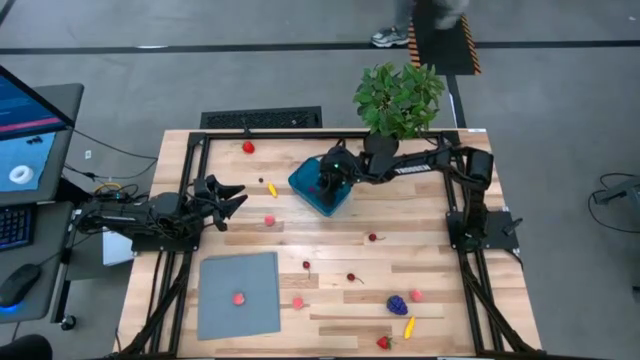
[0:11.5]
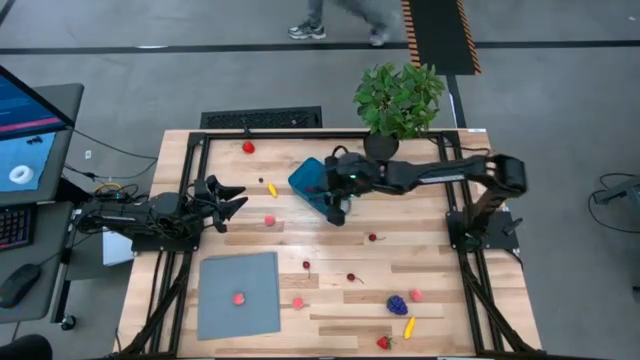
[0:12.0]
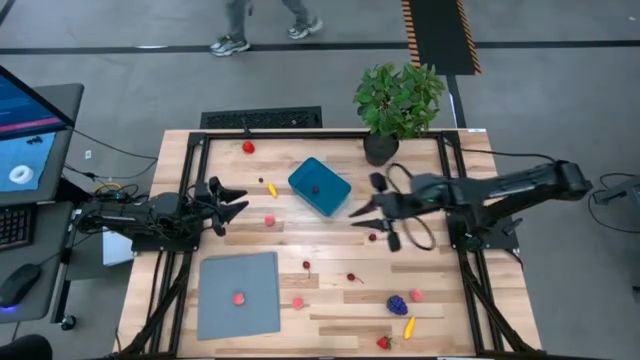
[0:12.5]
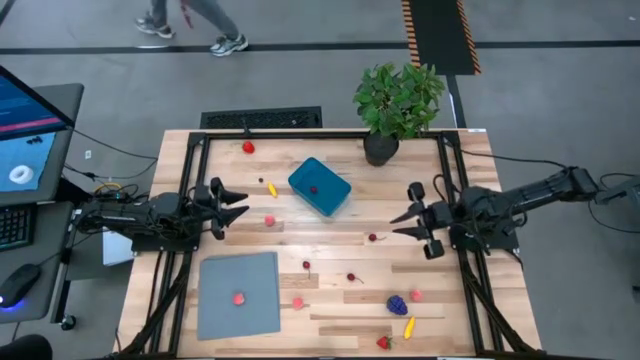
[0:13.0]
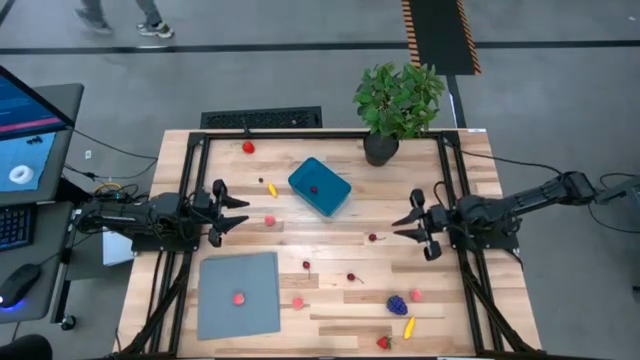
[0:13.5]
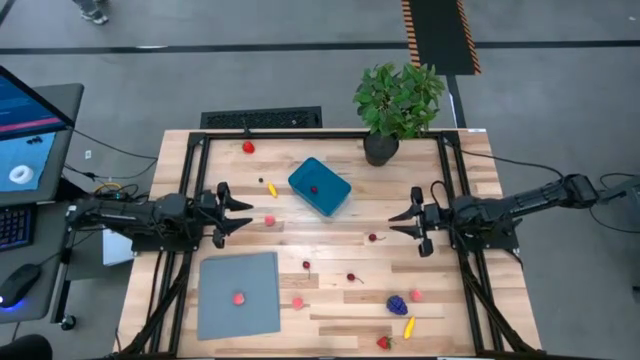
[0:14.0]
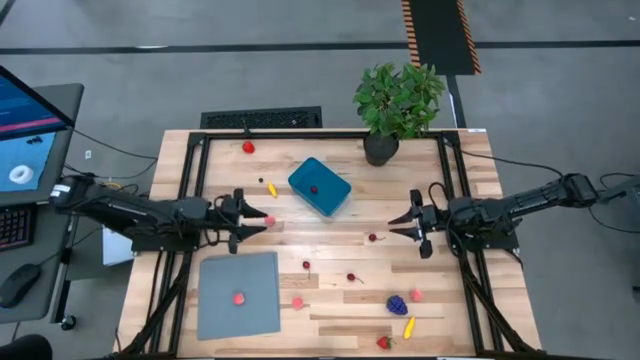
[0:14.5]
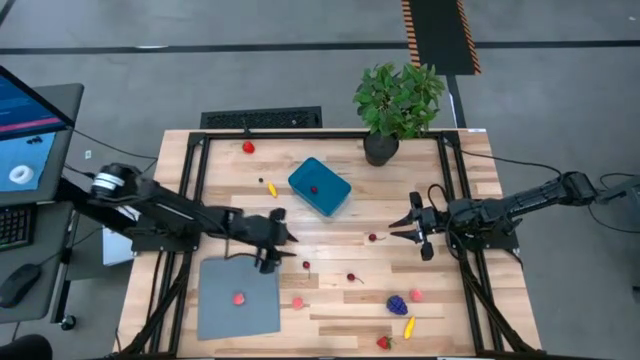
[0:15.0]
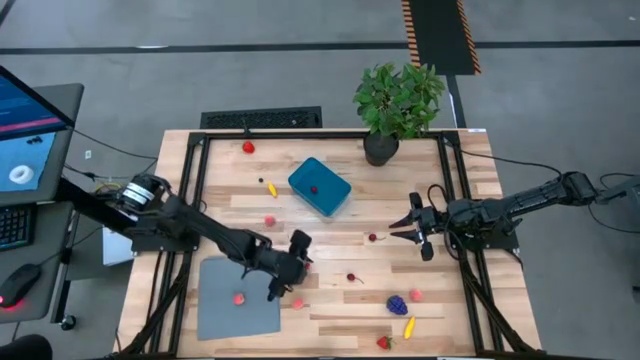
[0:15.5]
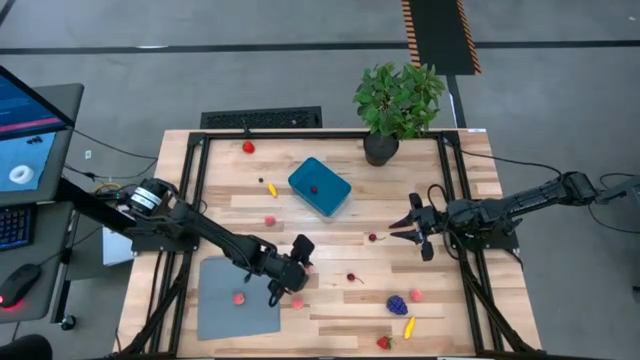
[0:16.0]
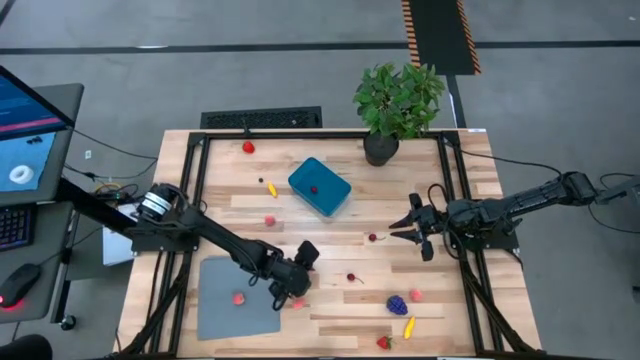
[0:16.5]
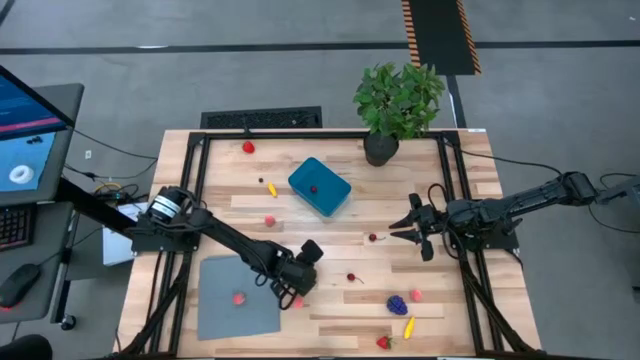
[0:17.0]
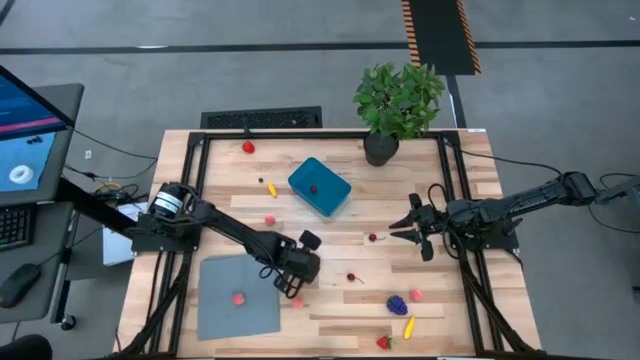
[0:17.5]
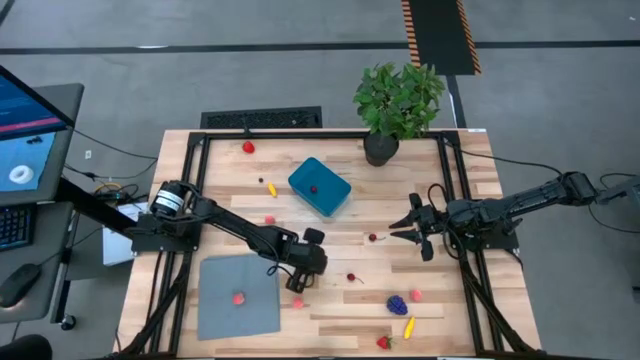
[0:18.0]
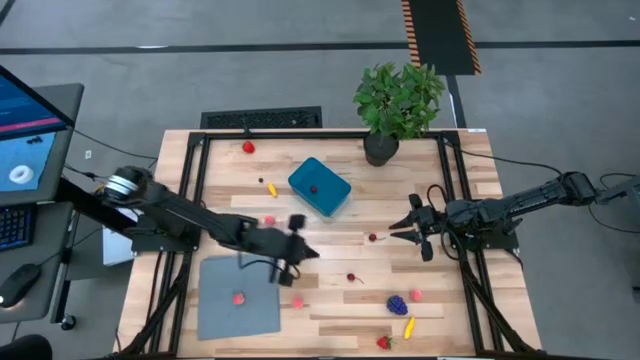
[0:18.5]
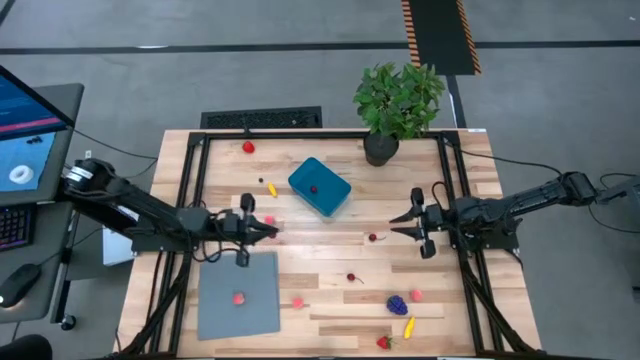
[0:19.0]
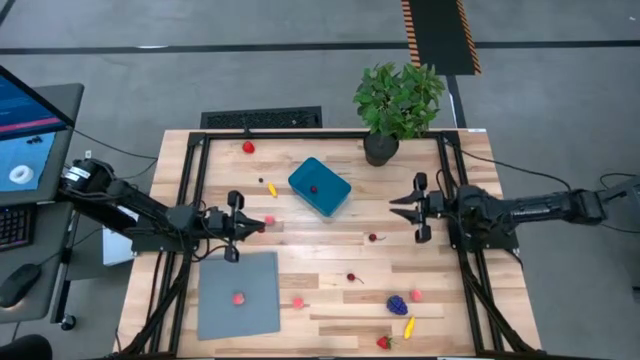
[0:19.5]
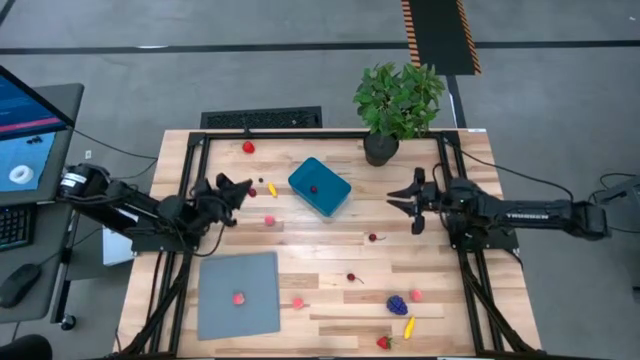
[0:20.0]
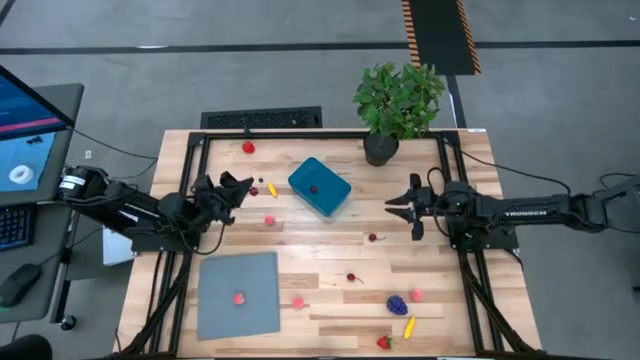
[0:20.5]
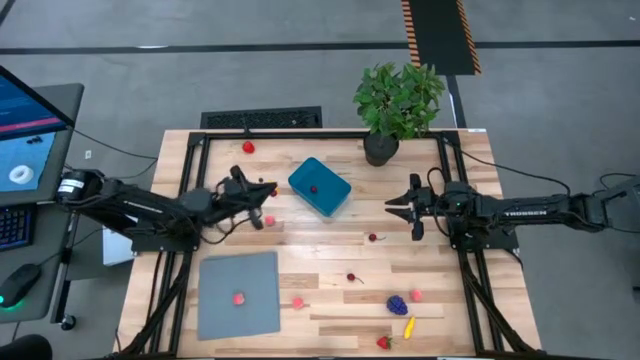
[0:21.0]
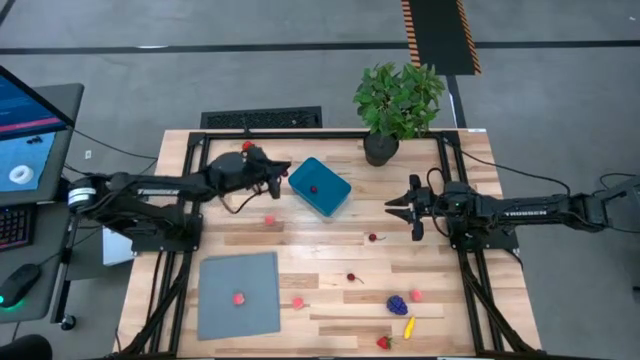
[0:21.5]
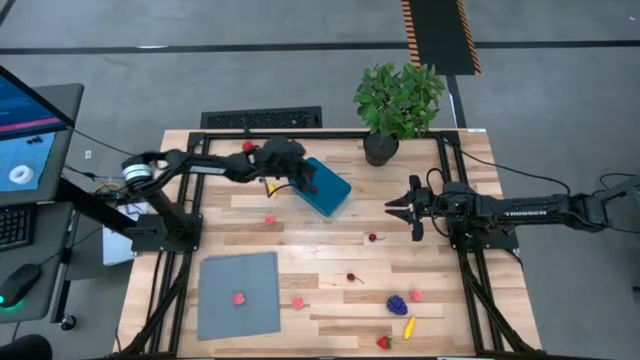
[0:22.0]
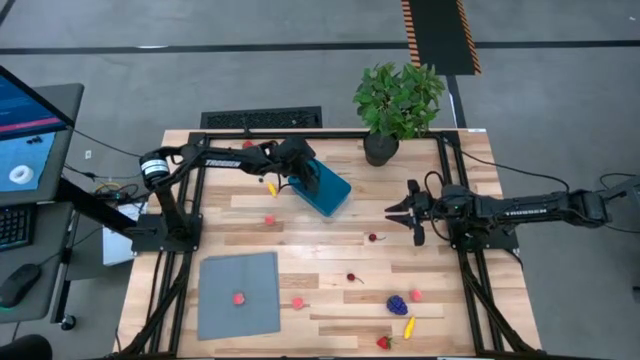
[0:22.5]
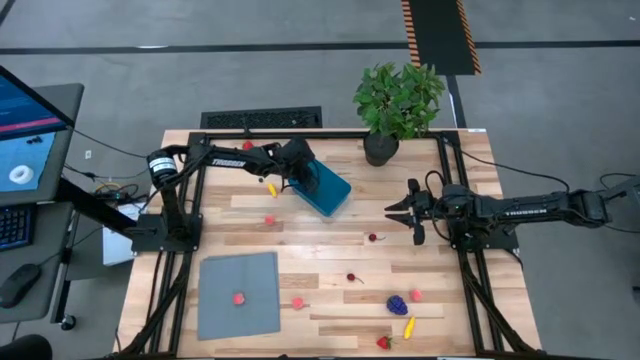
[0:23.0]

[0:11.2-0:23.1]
Task: Pick and placing Produce into tupperware
Put the bottom left cherry into the container

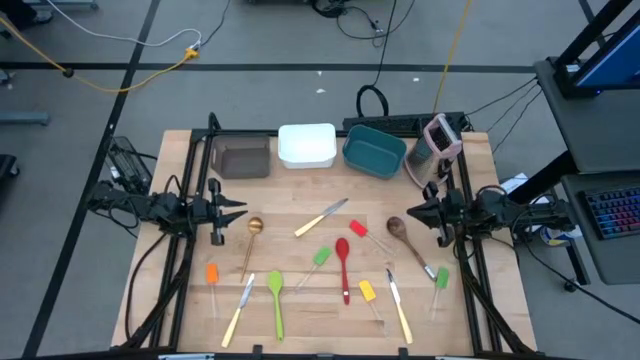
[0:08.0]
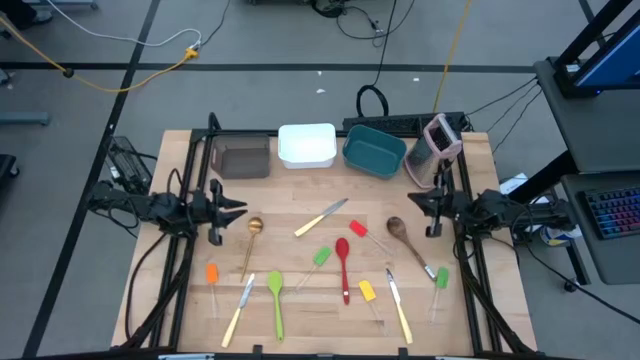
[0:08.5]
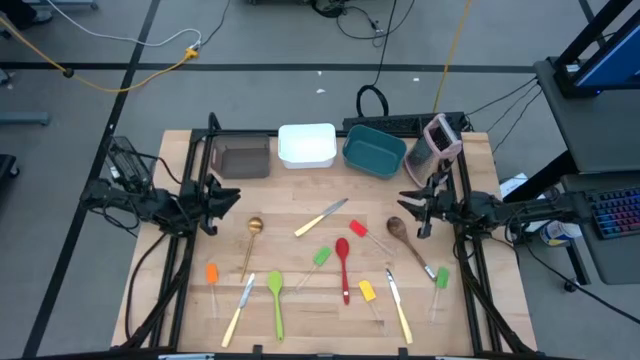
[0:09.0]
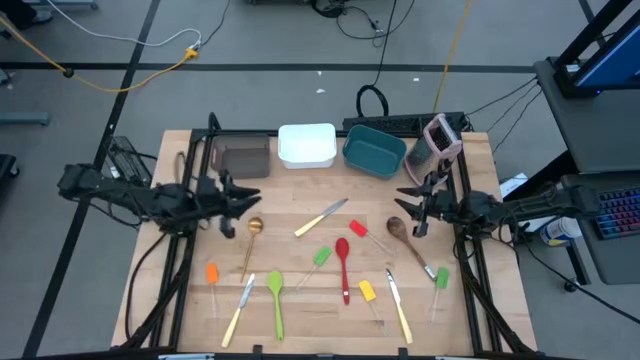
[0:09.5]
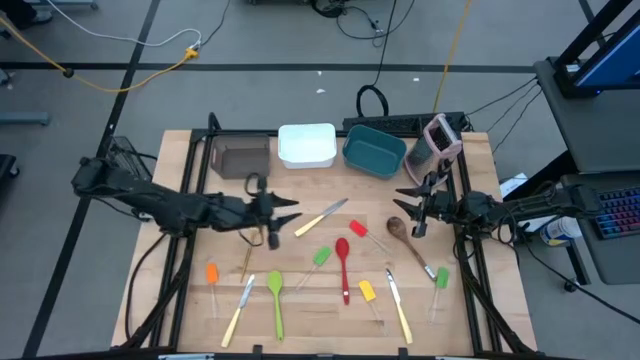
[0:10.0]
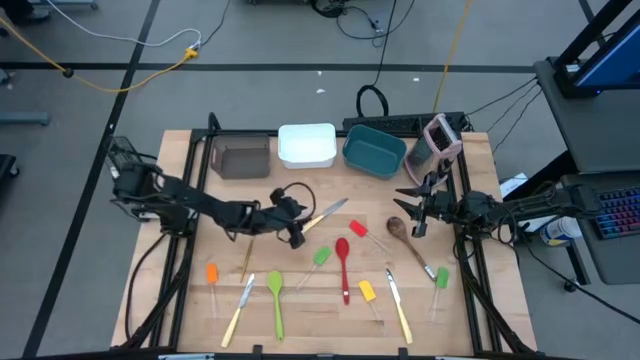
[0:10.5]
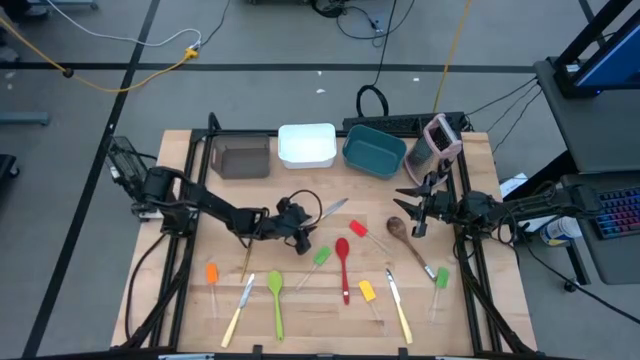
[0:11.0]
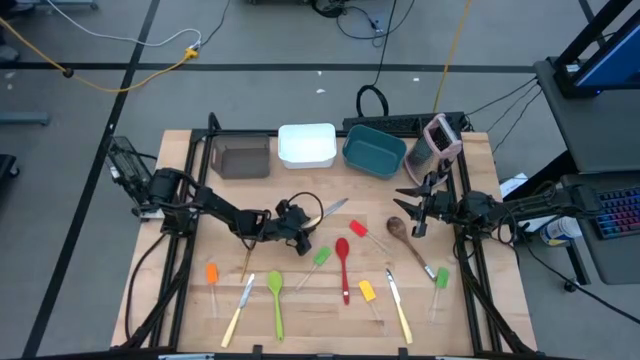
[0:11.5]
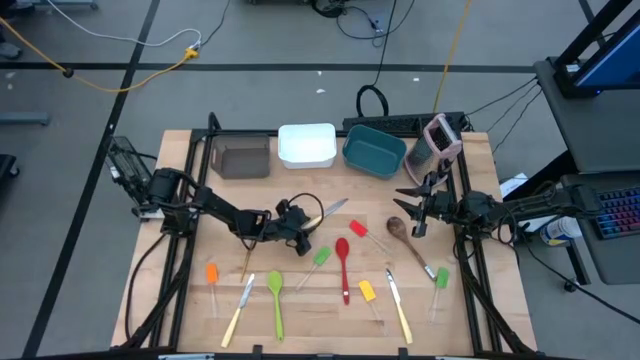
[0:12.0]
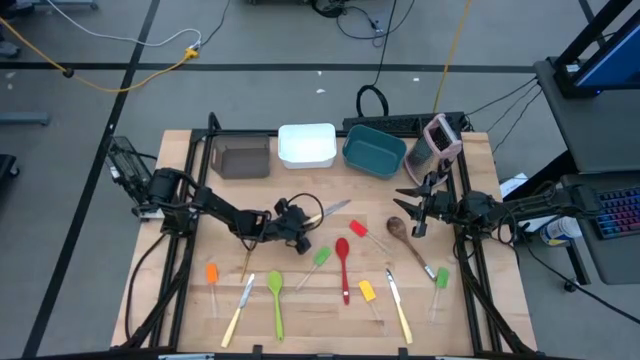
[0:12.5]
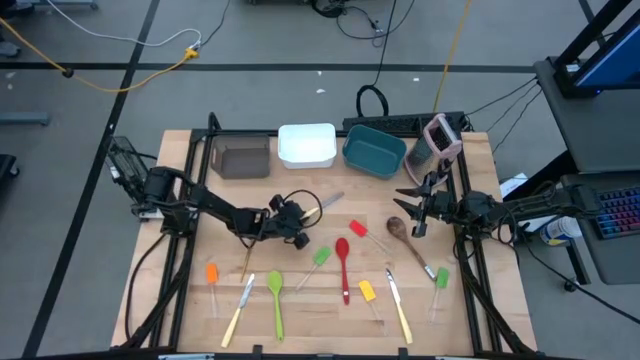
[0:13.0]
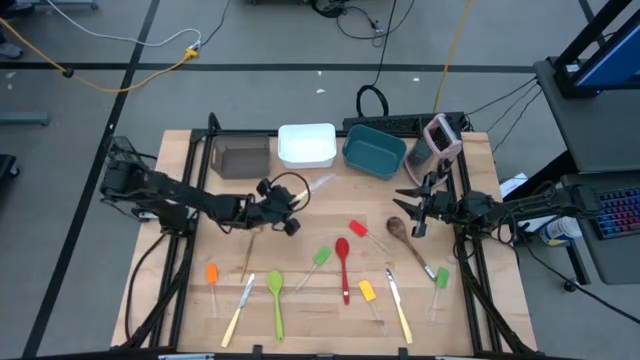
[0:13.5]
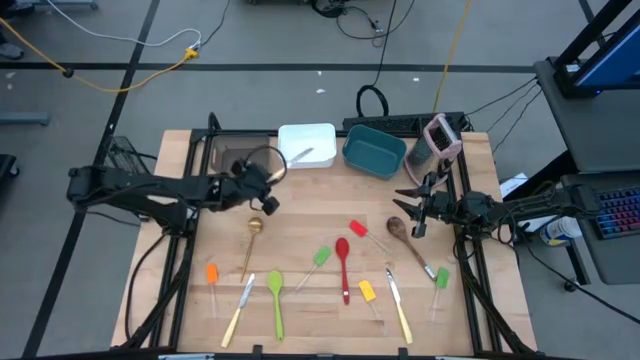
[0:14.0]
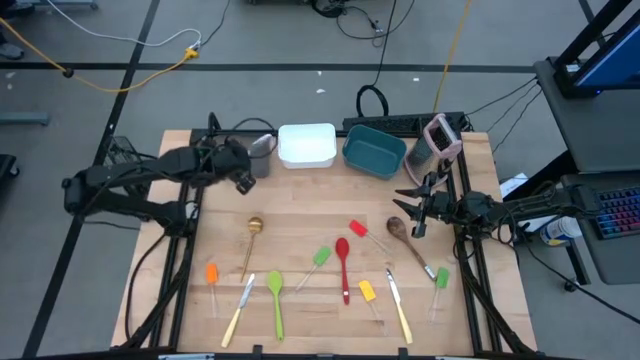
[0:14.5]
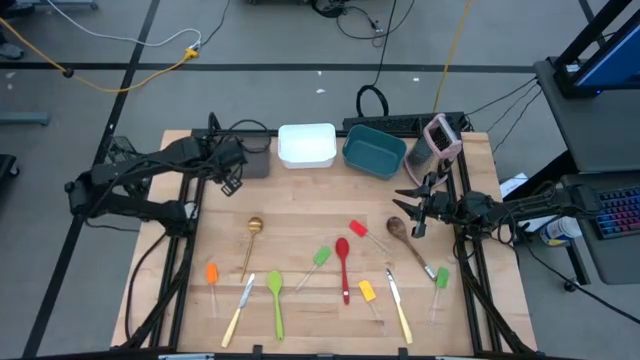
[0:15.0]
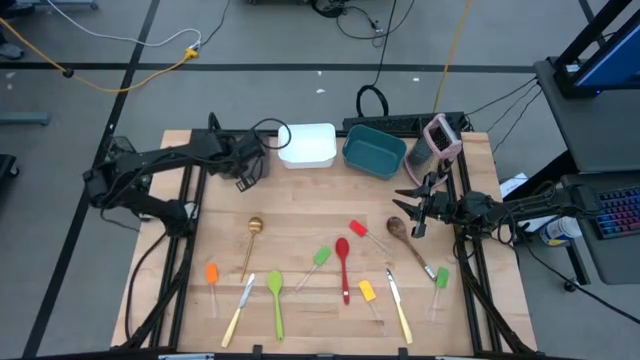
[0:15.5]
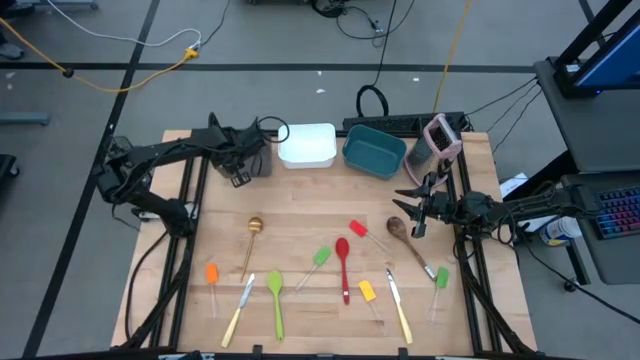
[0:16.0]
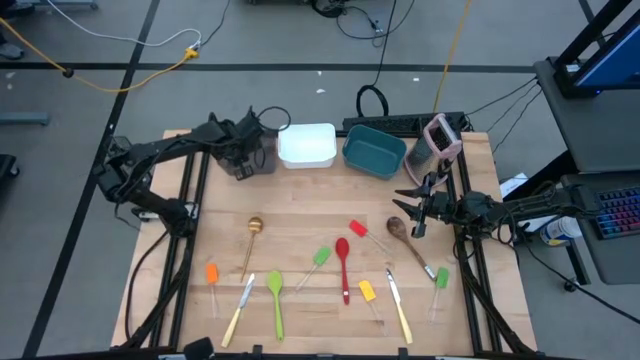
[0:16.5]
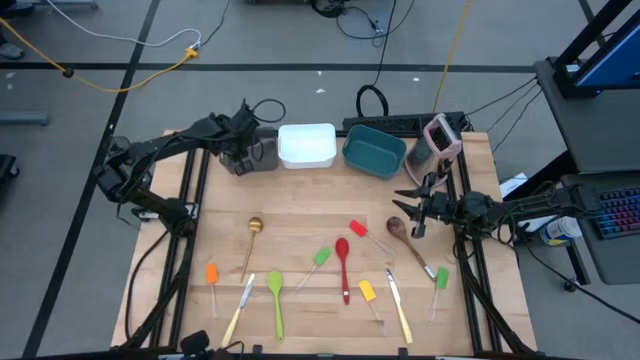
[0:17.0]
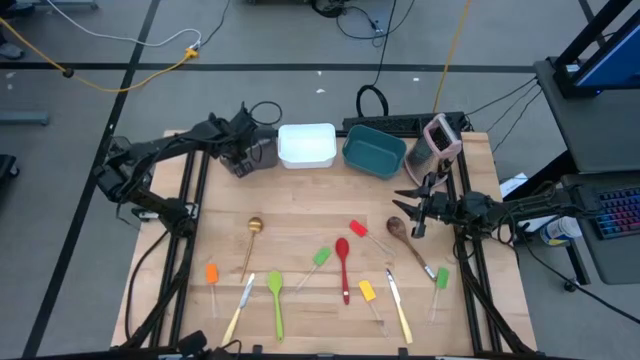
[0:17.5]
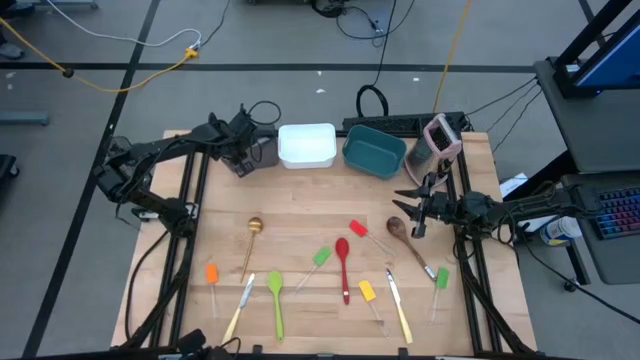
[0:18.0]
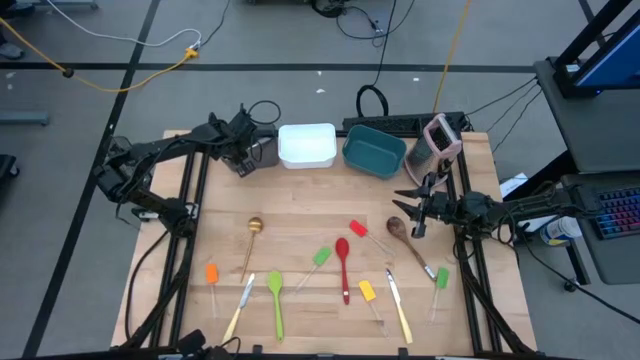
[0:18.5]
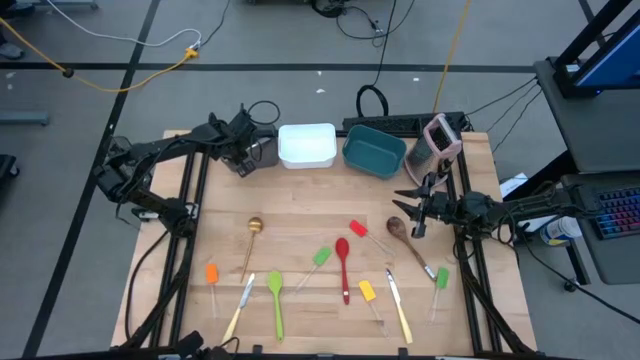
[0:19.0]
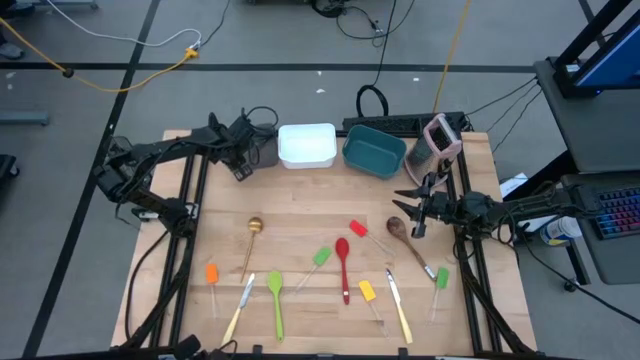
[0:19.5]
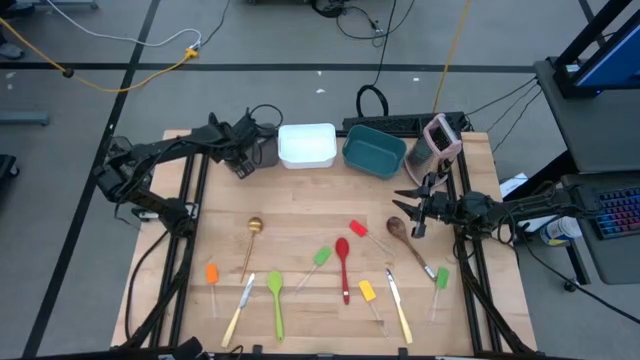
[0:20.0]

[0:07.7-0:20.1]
Task: Pick & Place Kitchen Items
Put the top yellow table knife into the black bin
